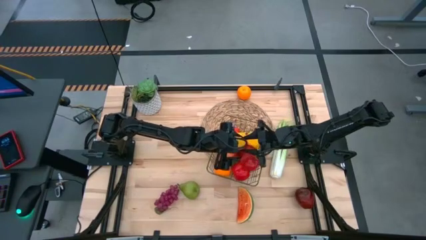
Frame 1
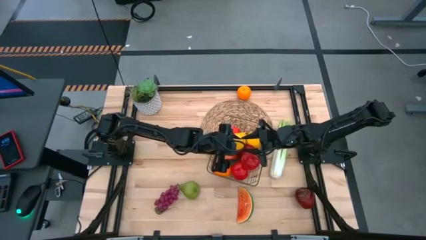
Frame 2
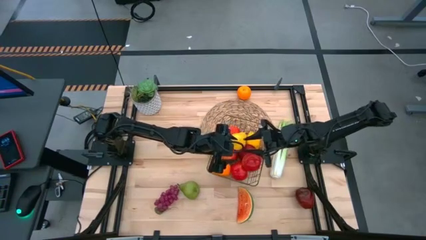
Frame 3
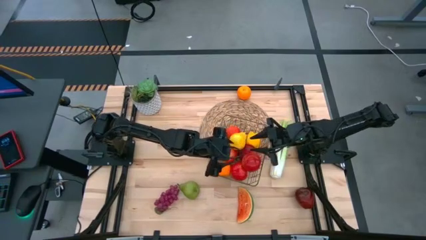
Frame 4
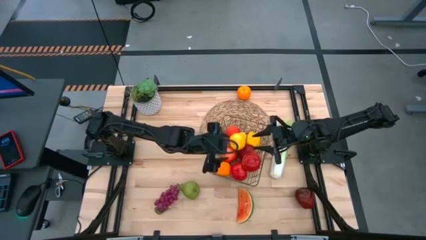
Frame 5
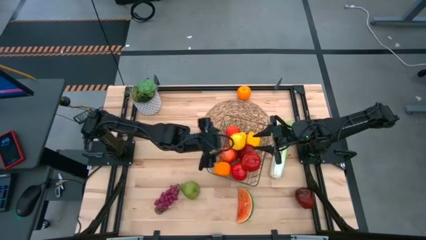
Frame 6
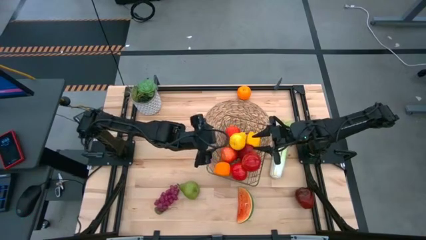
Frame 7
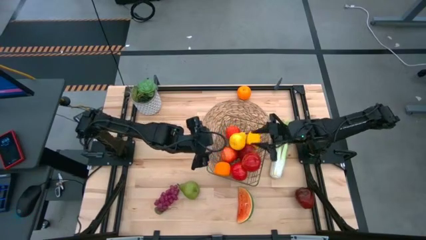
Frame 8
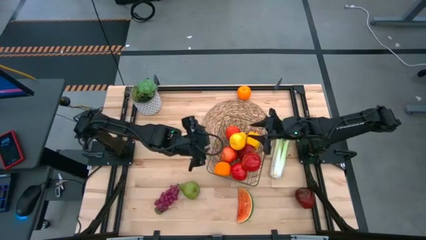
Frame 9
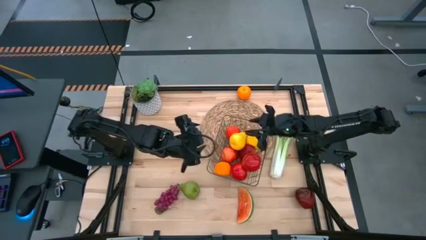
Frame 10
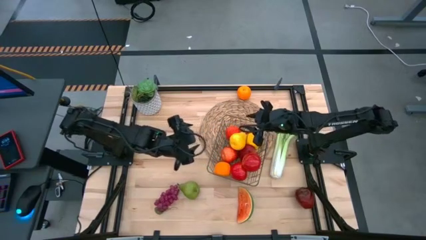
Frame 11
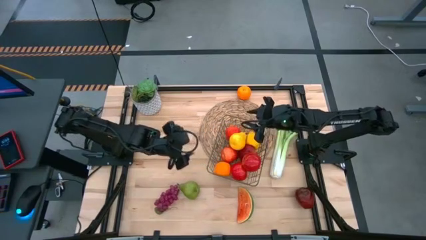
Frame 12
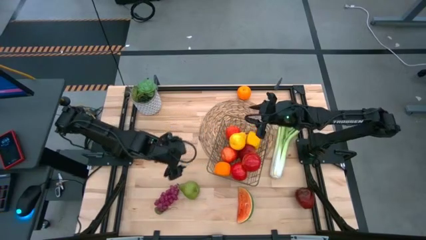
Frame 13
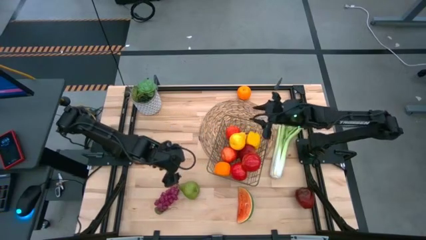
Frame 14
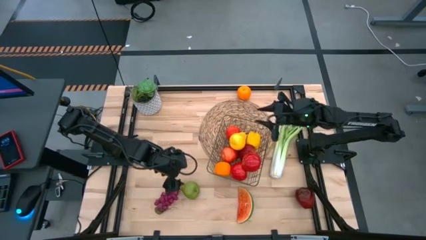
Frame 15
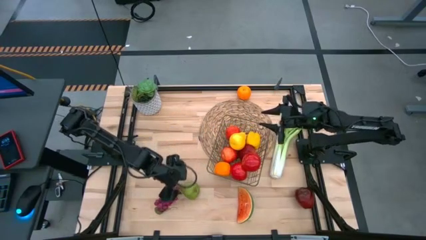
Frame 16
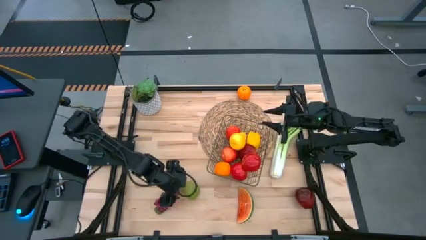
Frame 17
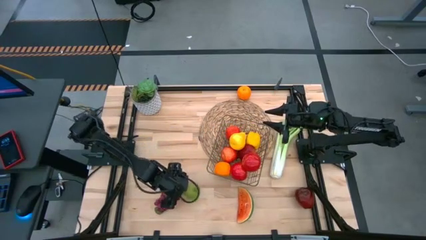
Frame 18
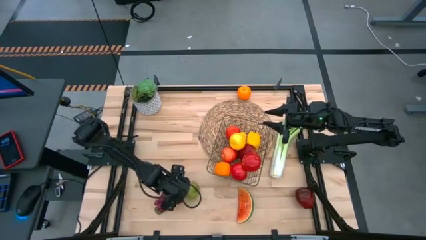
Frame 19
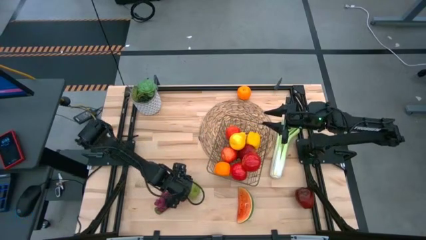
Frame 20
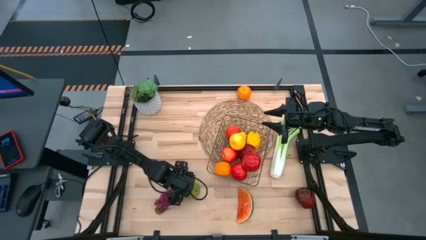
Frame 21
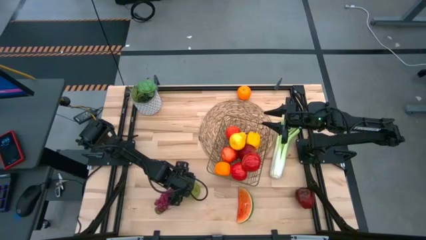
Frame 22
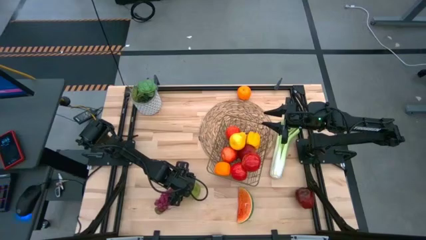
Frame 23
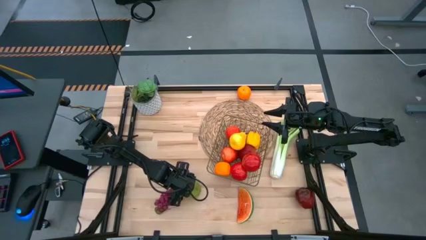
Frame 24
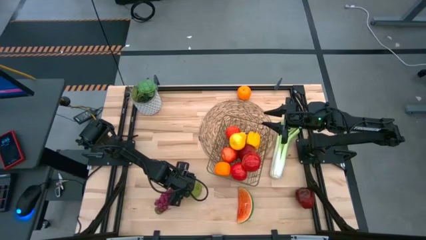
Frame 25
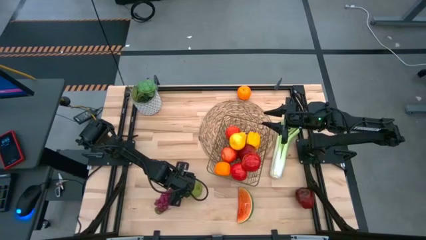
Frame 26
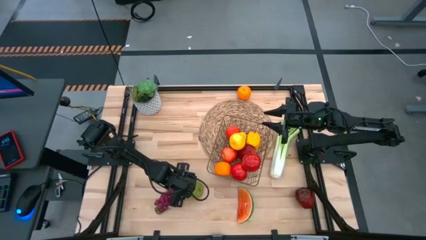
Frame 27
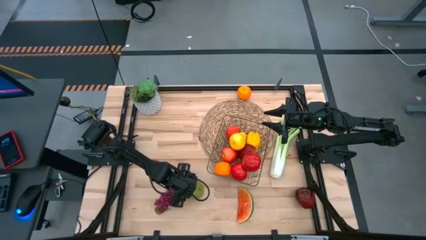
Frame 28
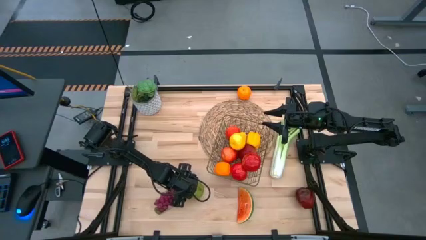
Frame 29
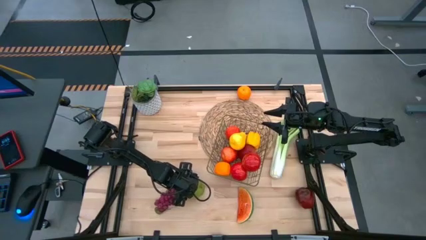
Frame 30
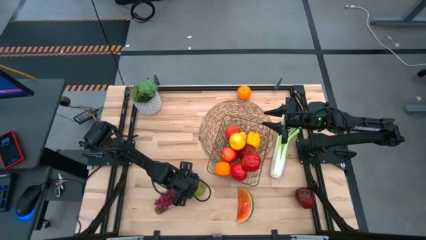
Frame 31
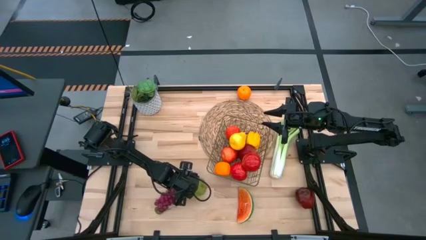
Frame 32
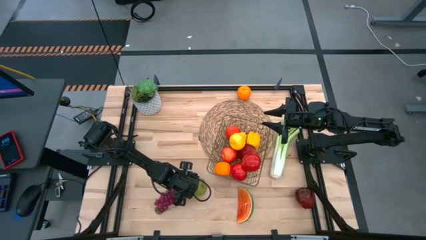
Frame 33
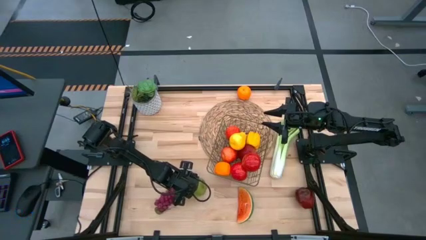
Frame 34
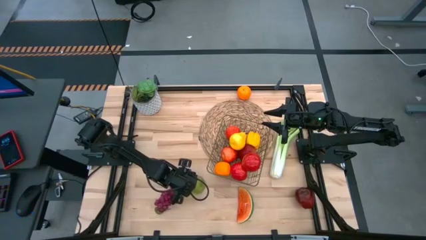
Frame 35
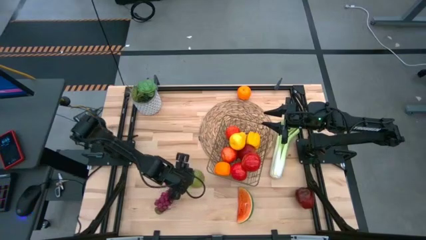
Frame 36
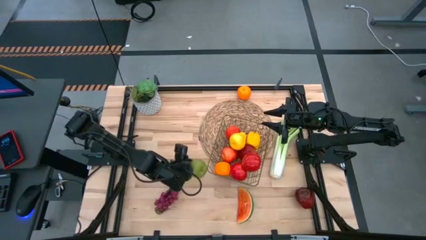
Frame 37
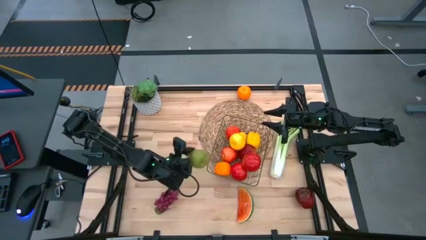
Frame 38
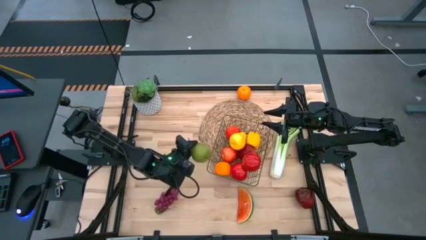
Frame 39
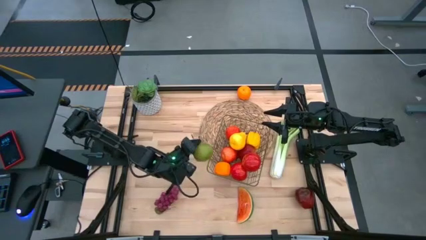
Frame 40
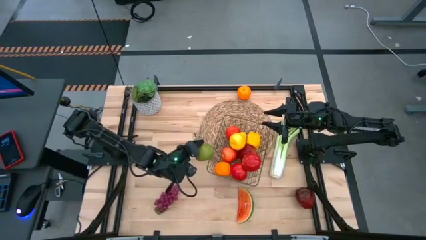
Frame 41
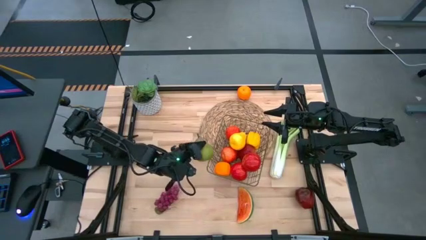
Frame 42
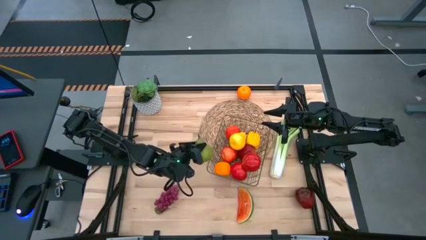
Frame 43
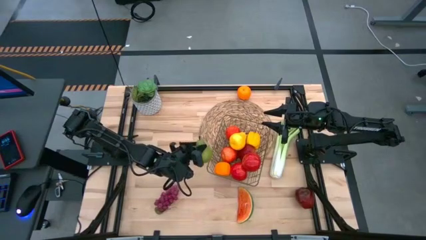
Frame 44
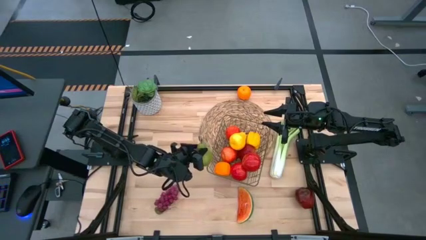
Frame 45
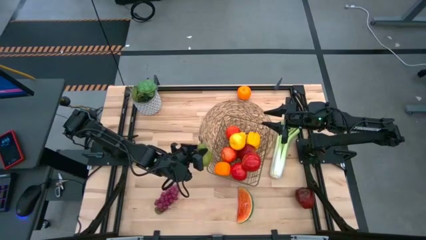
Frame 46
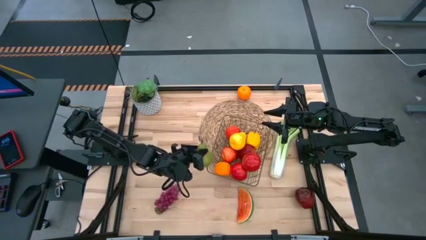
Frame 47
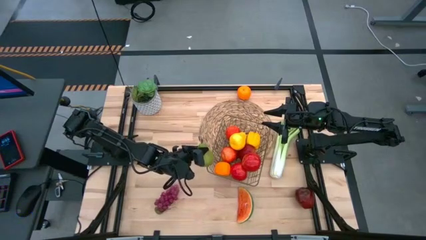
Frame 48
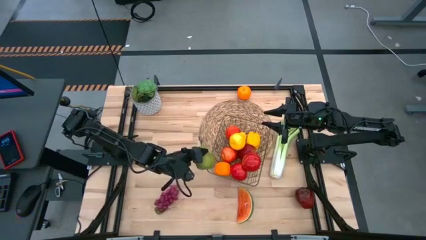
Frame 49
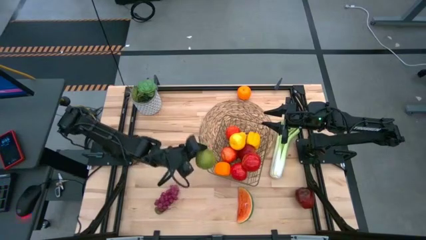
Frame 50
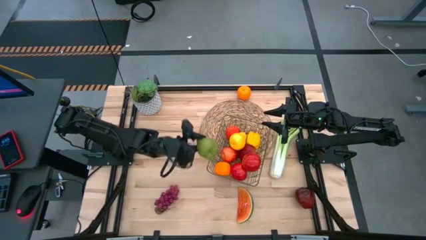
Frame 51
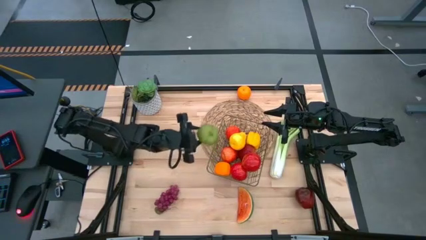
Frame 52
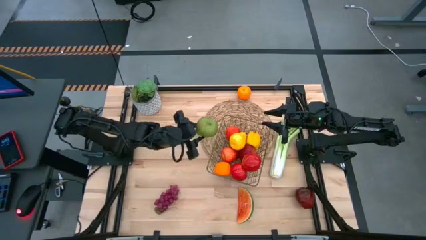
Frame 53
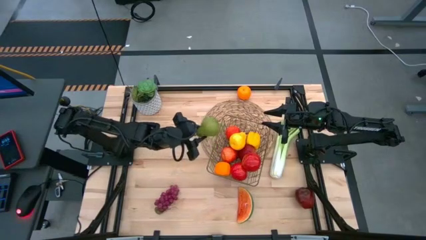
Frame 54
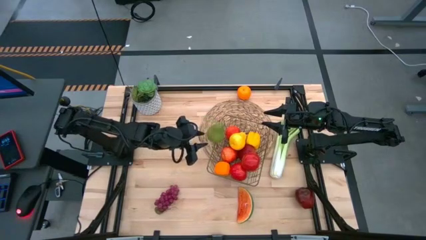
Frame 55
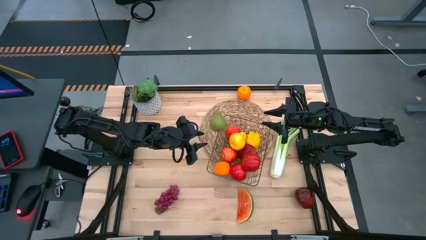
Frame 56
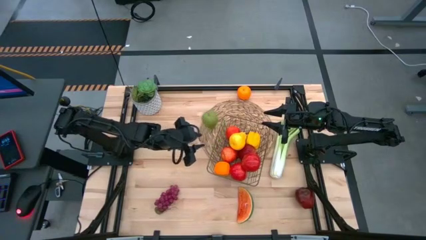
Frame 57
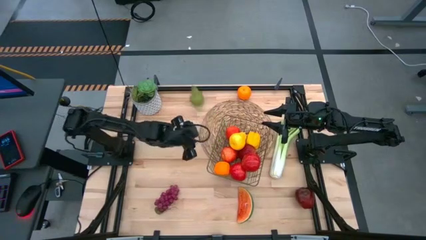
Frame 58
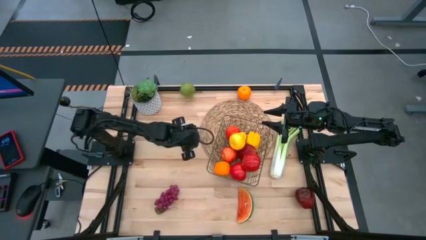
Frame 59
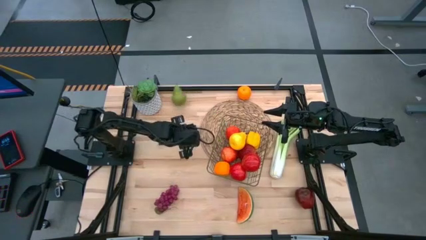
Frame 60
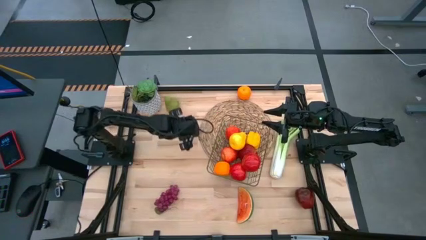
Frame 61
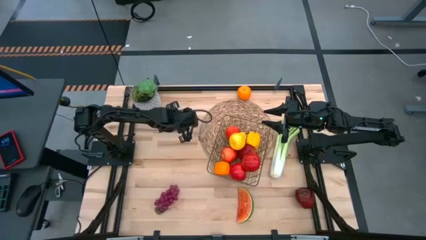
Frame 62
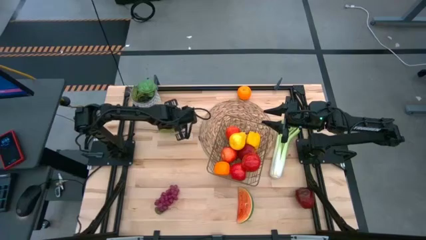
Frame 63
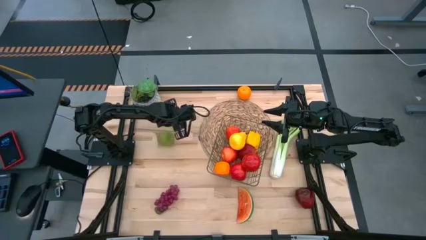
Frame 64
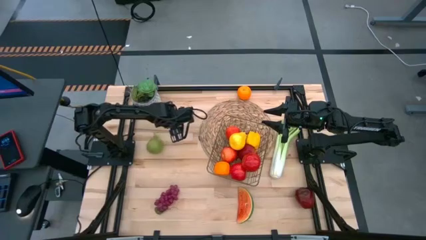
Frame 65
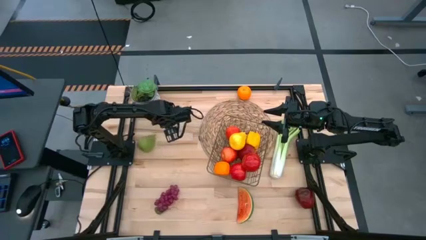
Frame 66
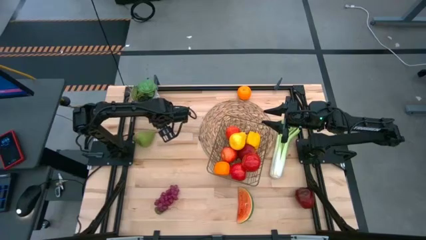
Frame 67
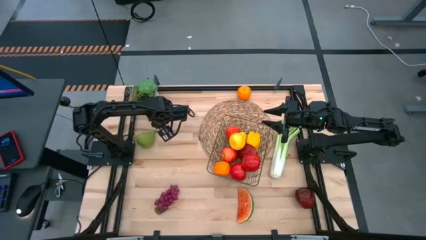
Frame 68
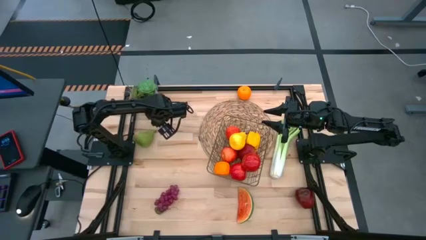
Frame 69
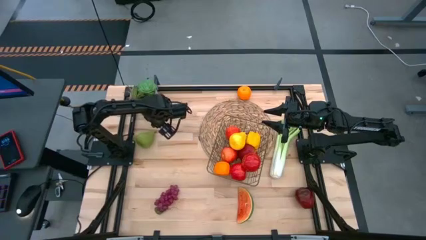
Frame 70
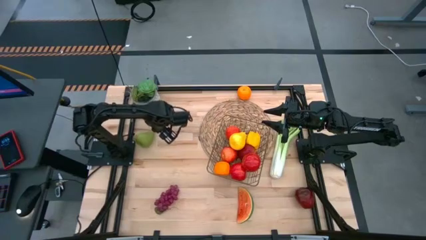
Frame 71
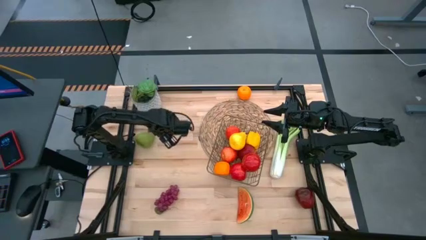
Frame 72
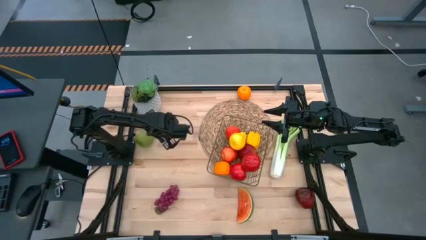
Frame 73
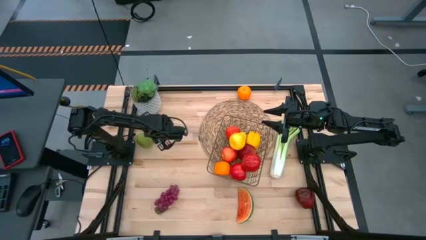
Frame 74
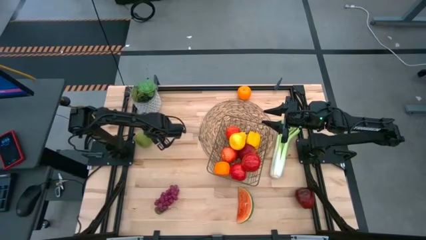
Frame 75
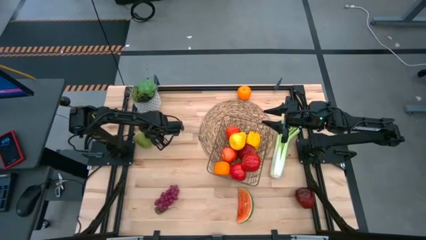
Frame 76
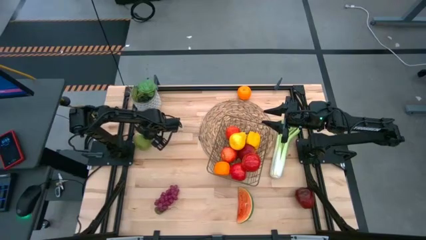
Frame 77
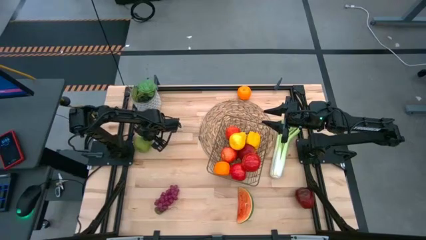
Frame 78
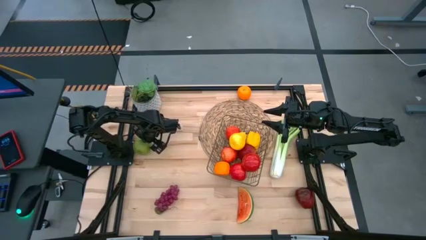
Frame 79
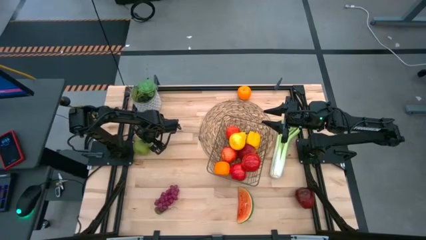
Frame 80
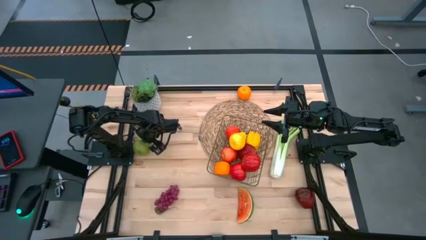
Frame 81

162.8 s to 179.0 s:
Task: Build produce basket
Put the green pear into the wire basket
